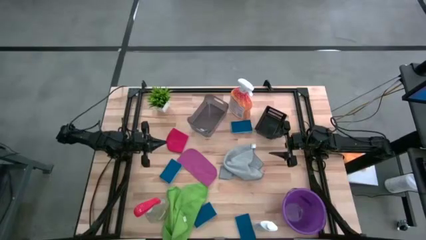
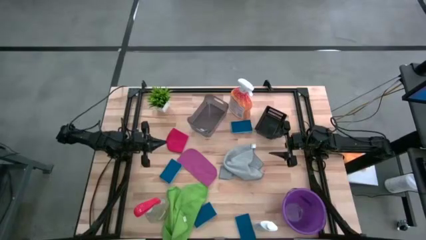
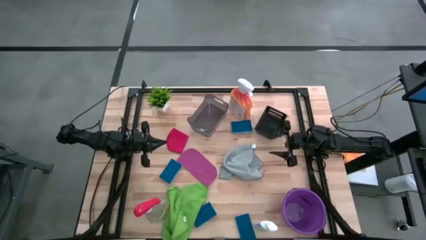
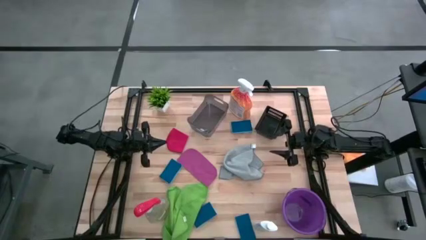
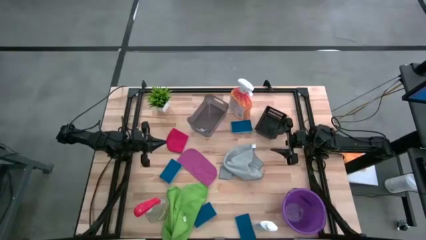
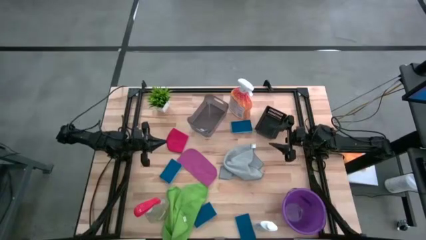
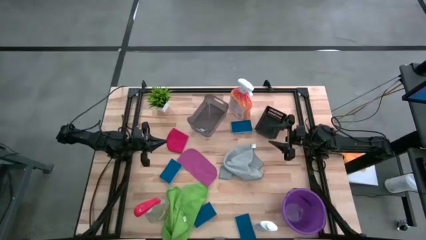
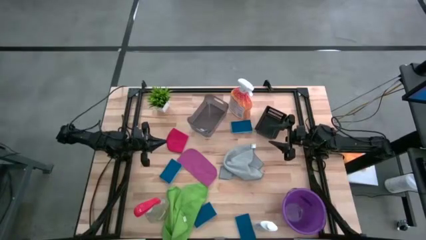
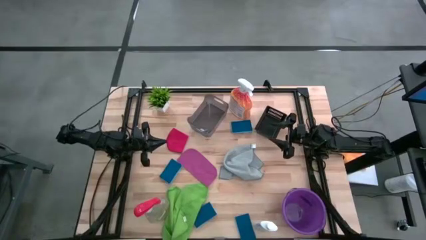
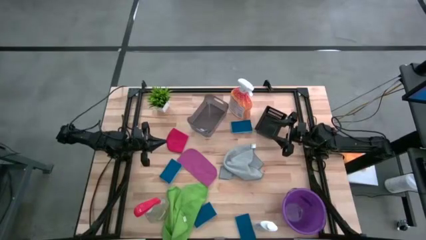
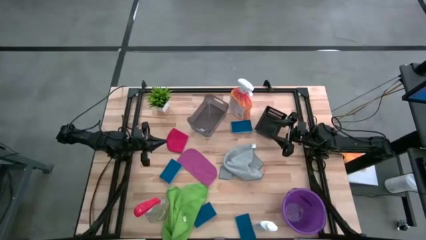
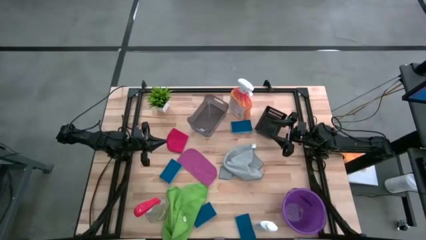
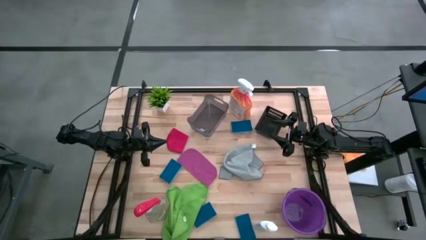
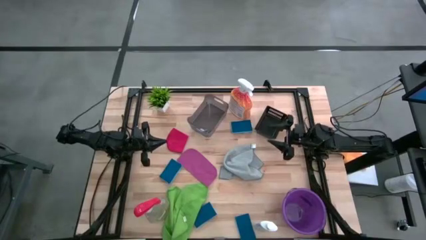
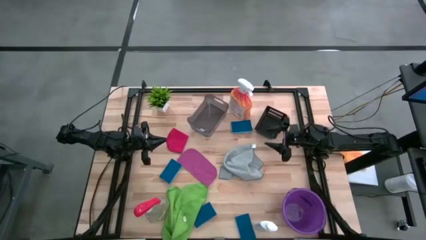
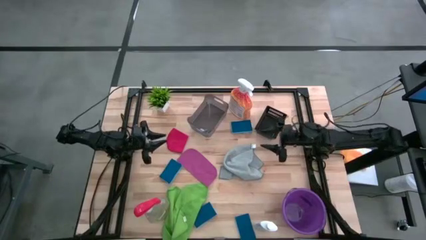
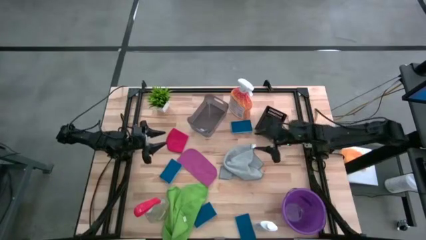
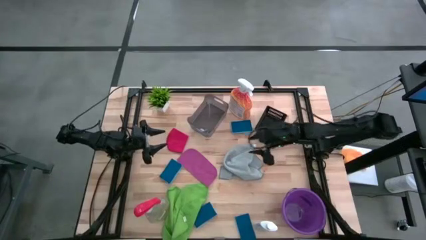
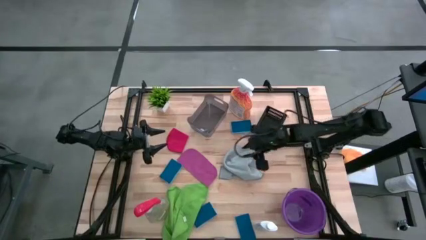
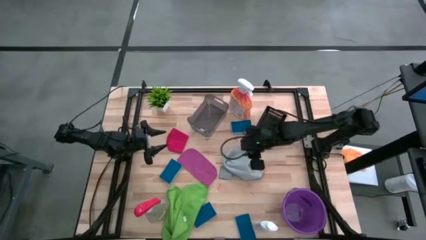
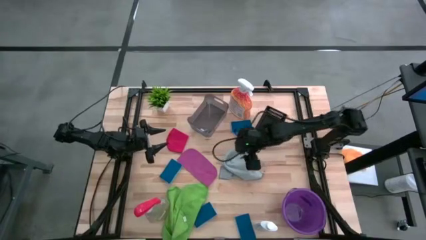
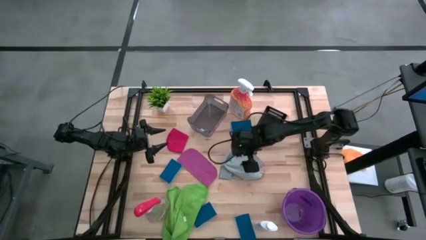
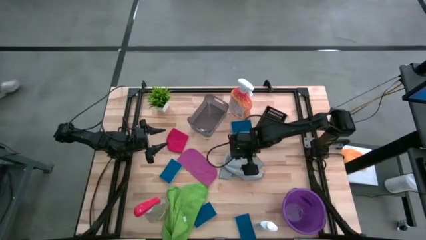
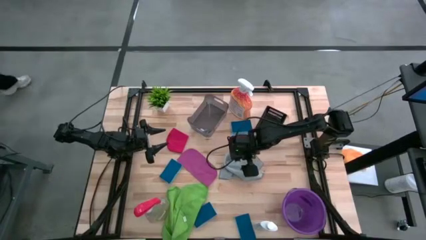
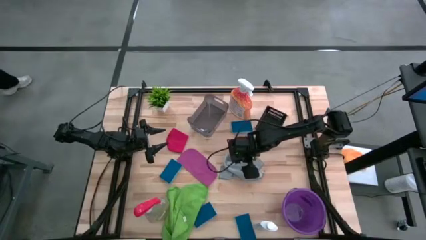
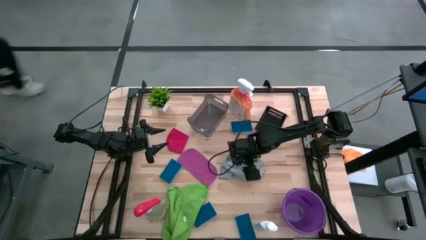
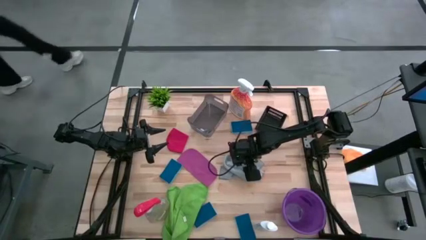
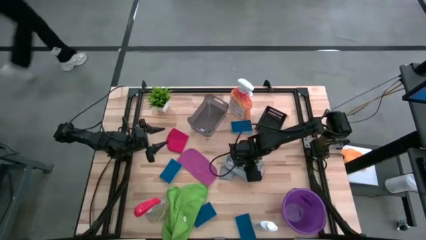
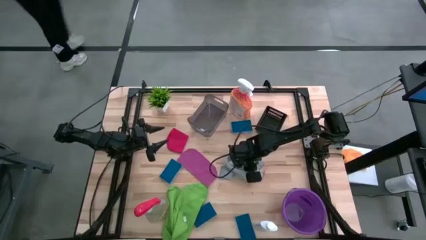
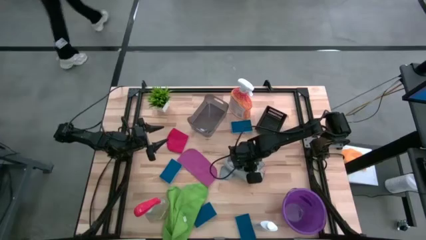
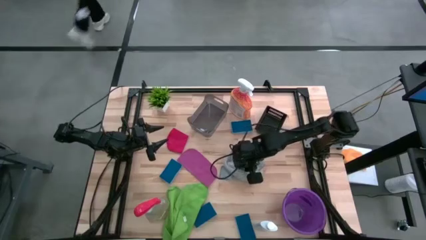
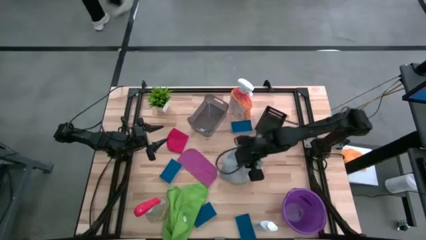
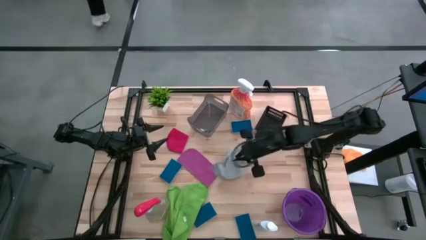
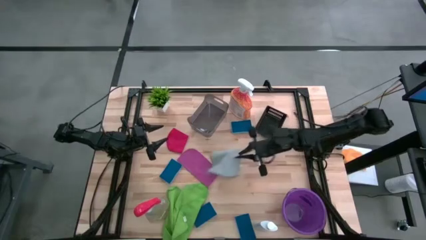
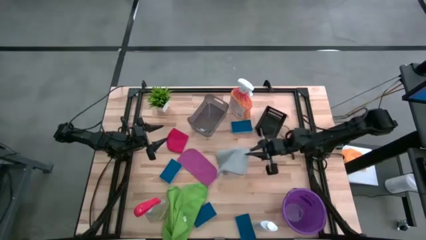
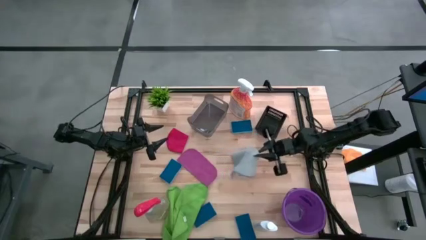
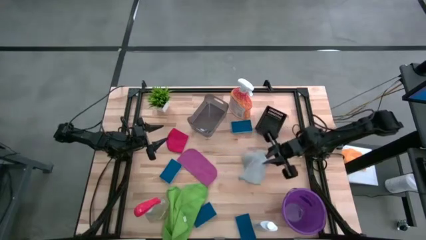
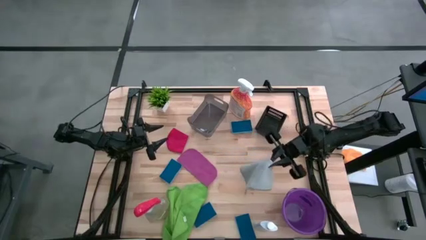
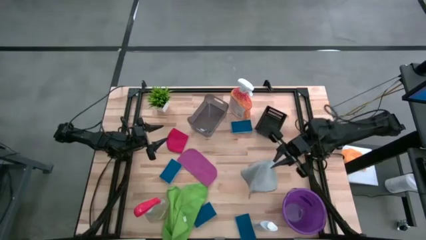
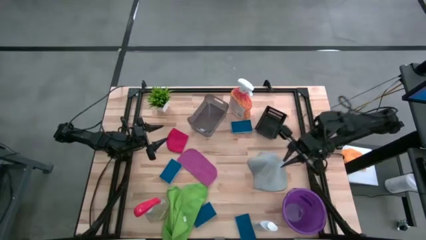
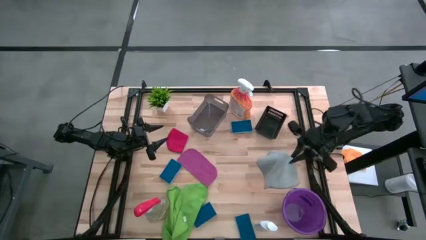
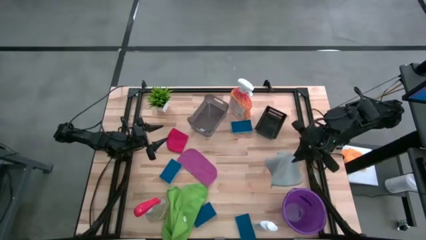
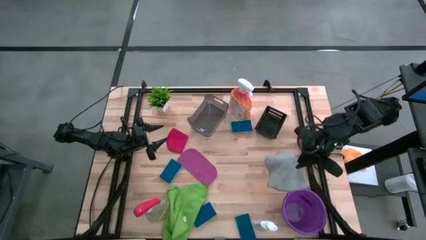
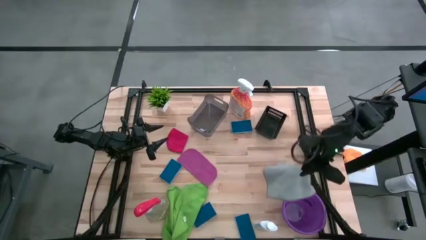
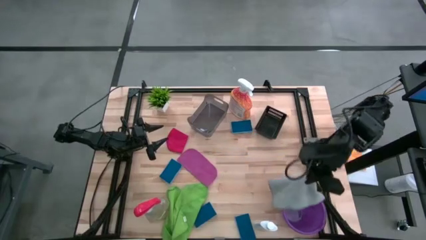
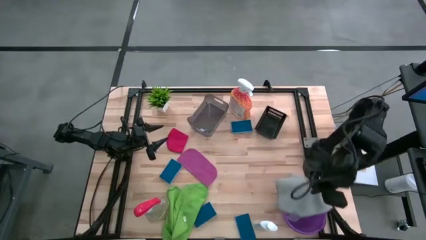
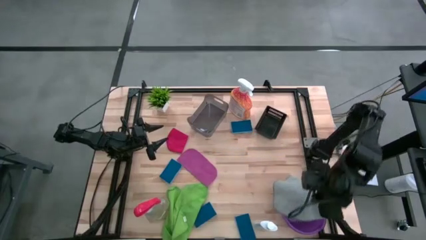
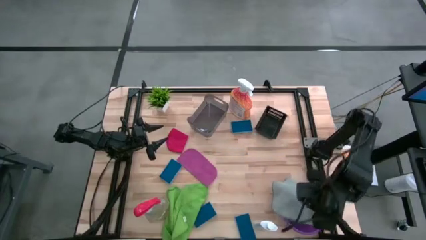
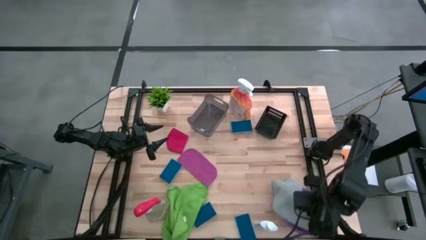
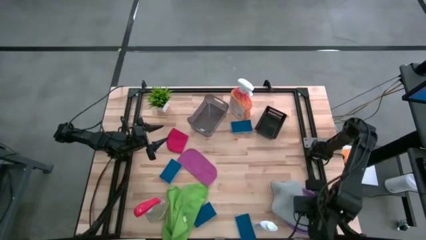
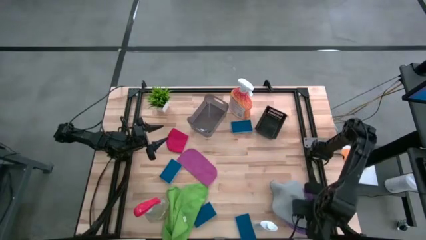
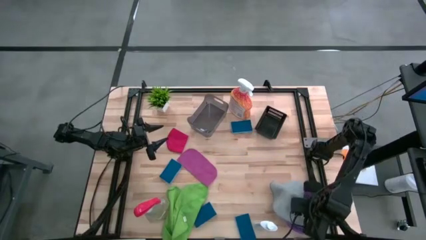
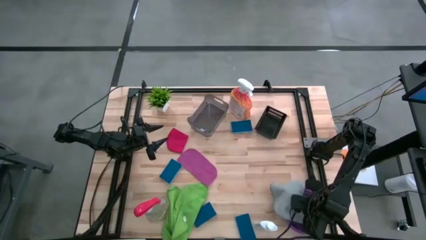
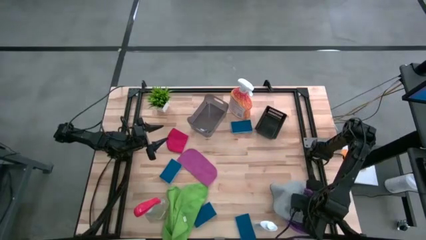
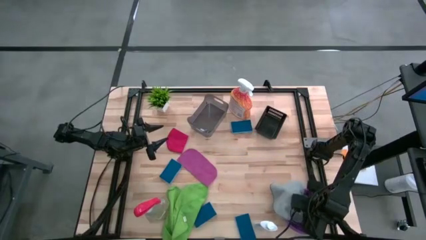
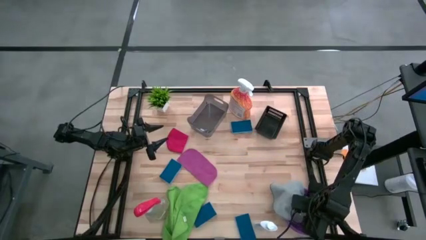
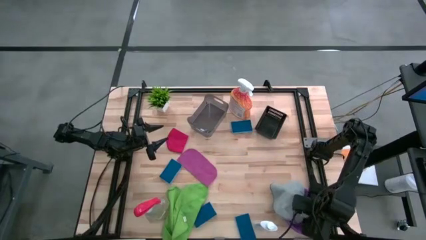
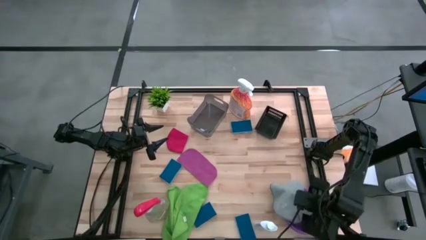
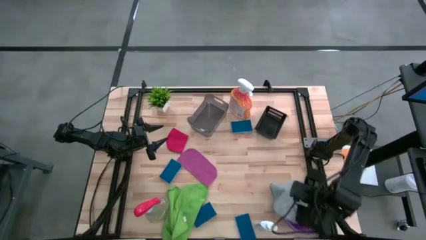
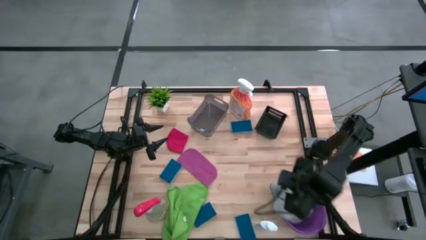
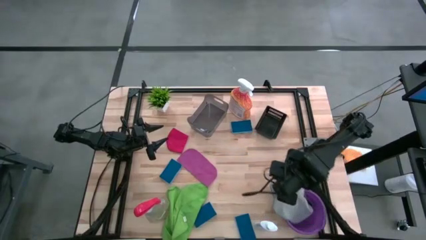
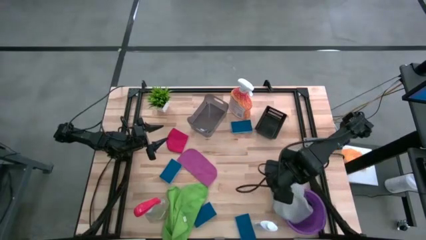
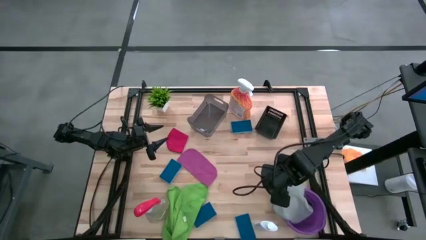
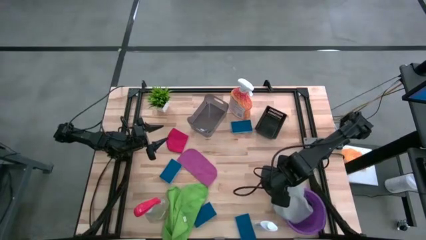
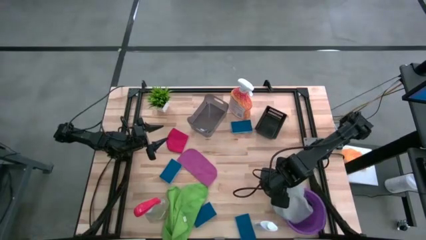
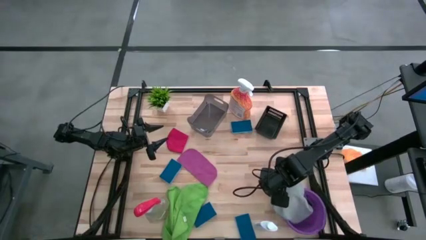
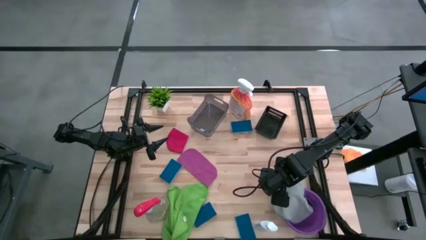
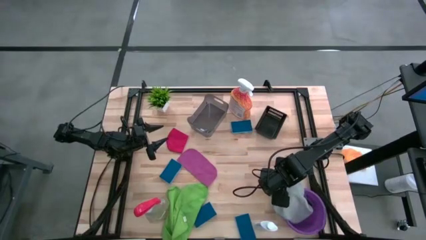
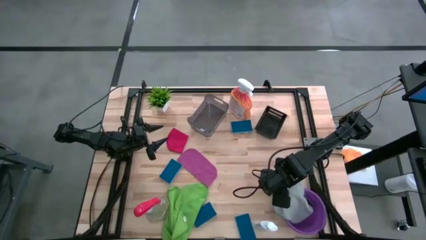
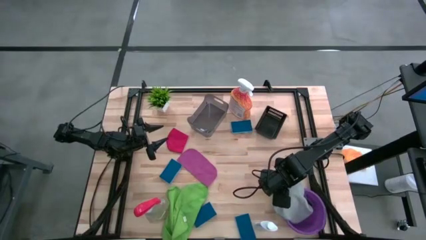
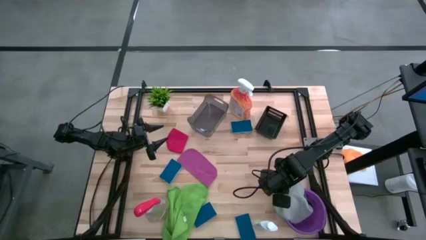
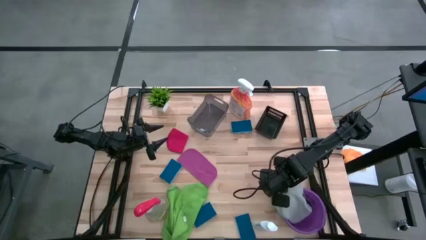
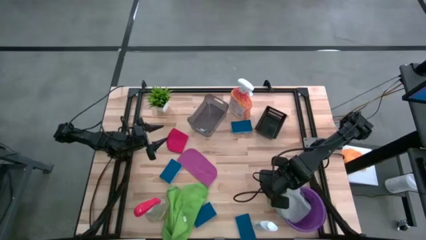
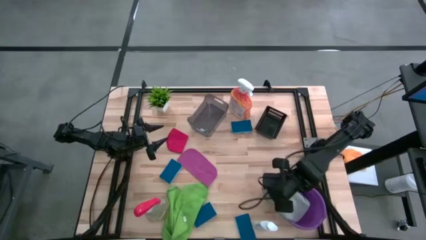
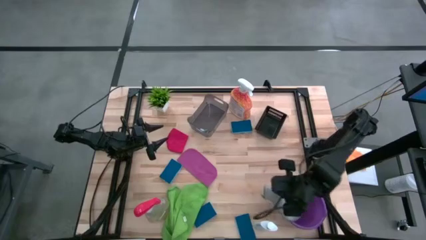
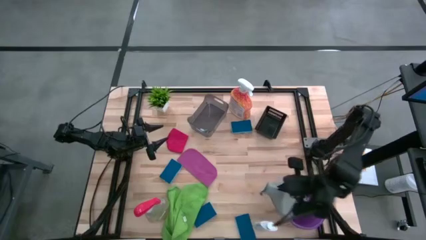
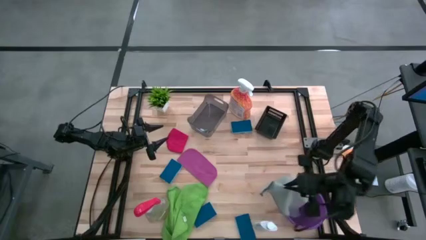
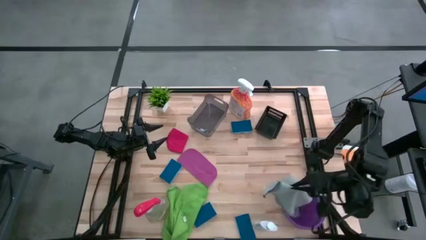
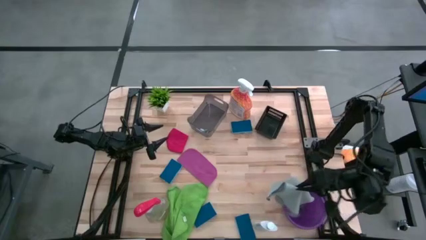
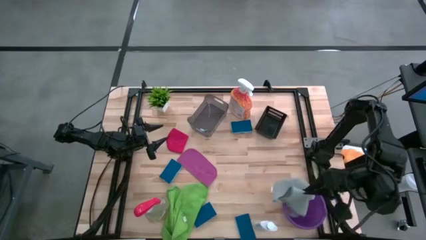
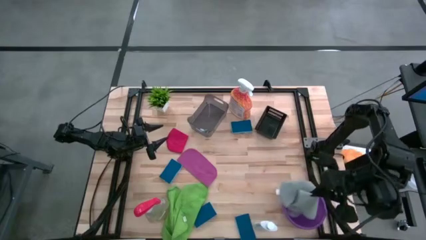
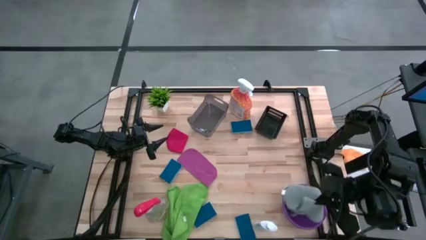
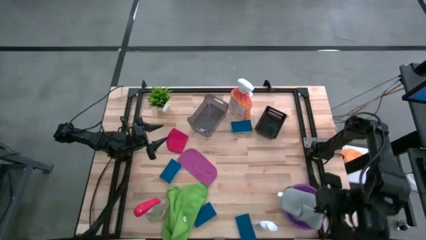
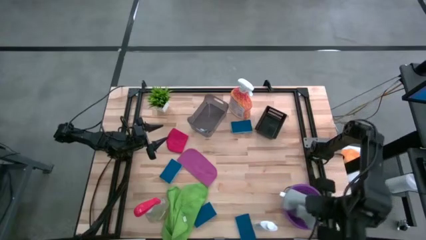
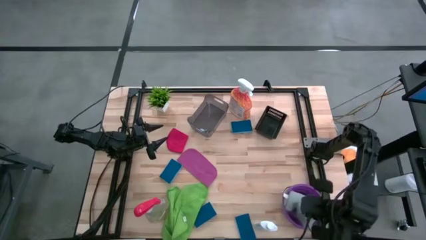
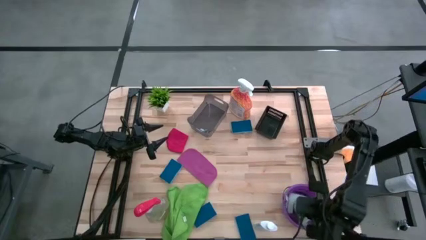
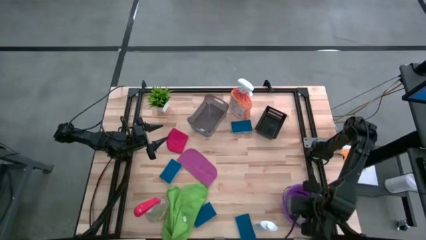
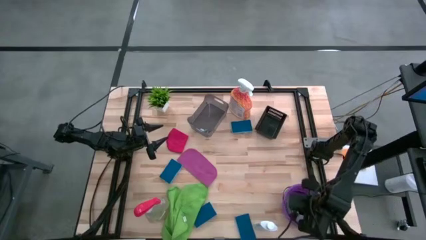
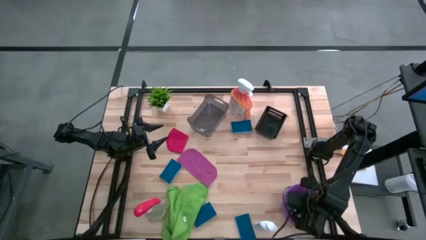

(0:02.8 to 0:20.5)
Task: Pick & Place Kitchen Items
Put the gray microfiber cloth into the purple bucket
